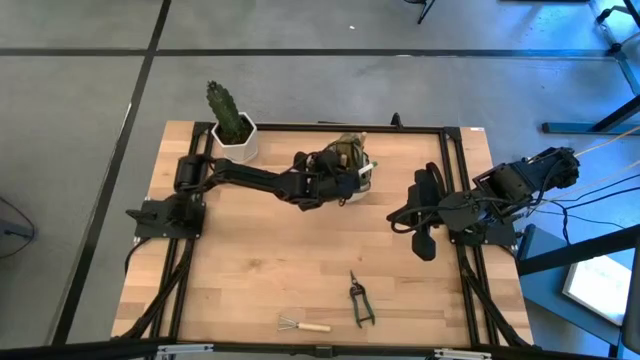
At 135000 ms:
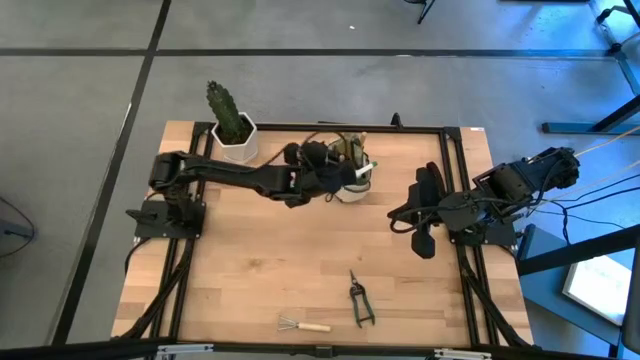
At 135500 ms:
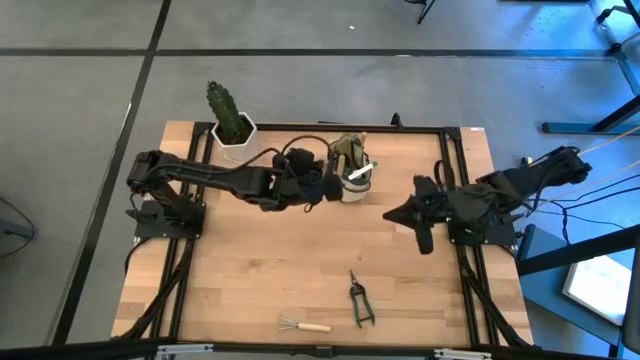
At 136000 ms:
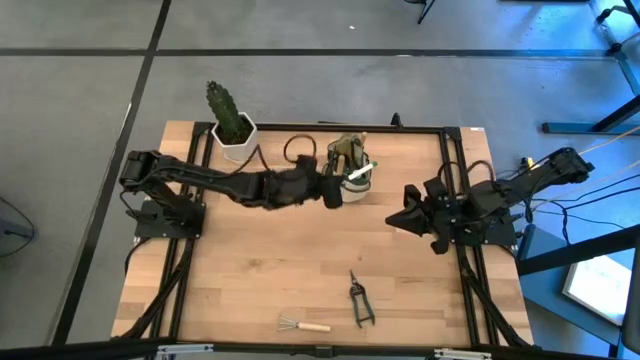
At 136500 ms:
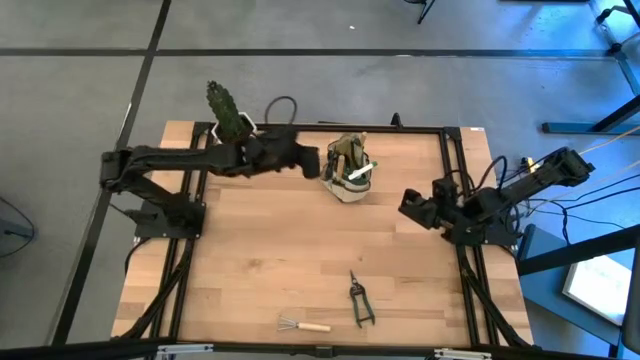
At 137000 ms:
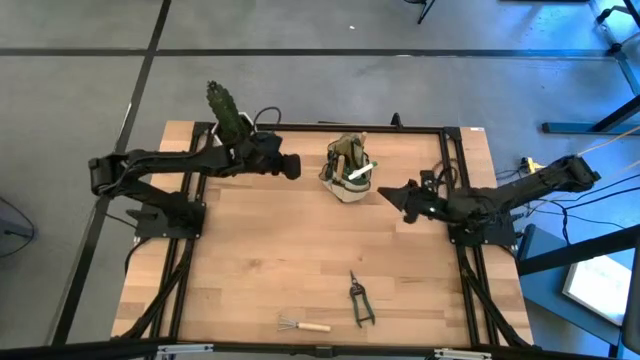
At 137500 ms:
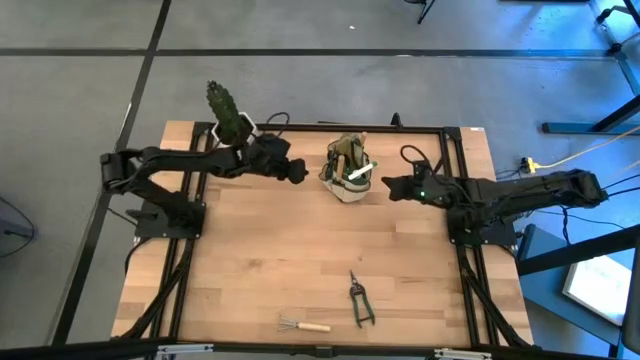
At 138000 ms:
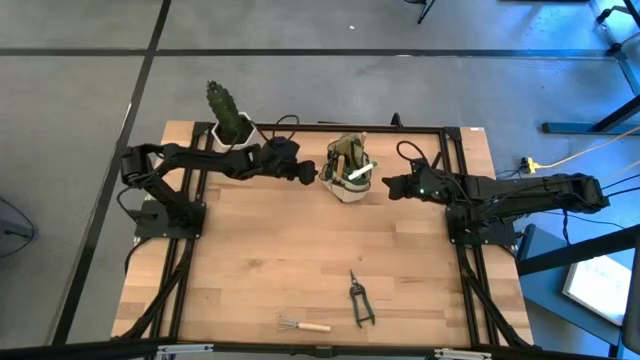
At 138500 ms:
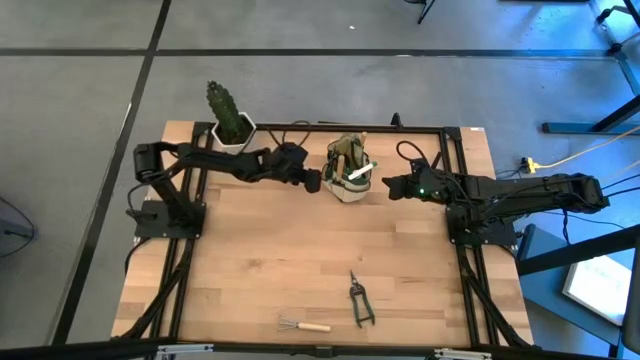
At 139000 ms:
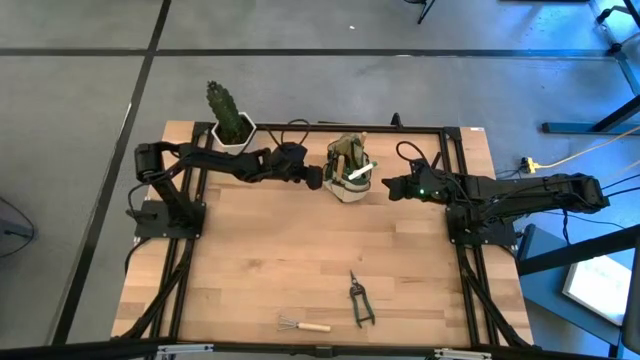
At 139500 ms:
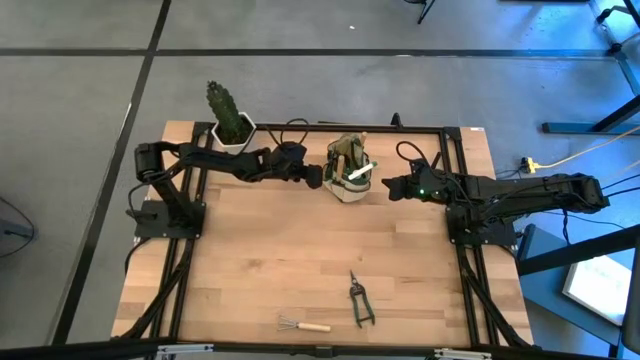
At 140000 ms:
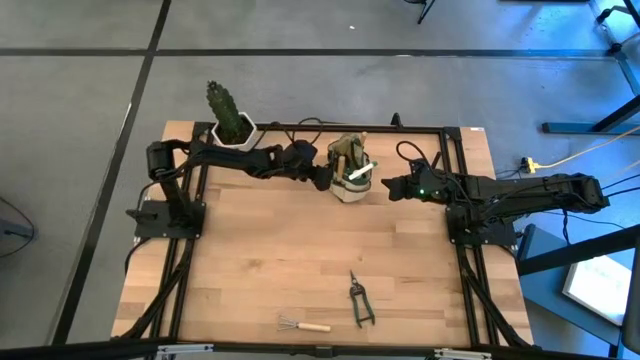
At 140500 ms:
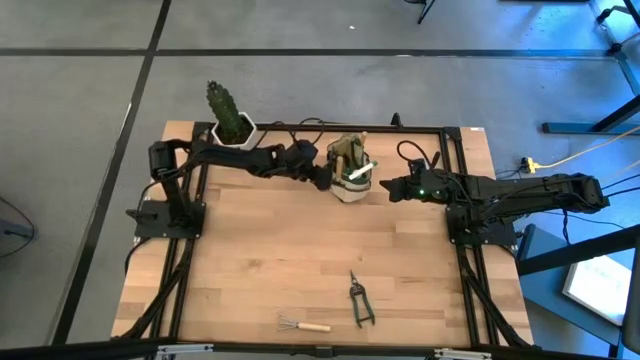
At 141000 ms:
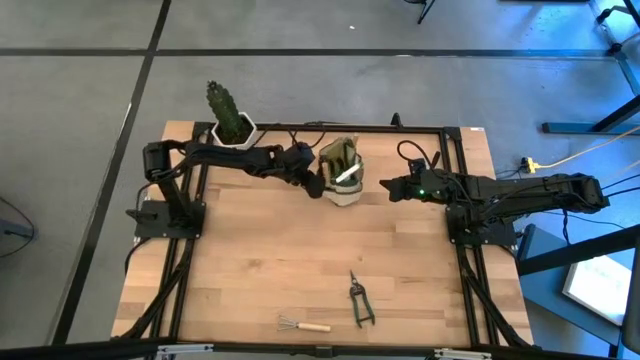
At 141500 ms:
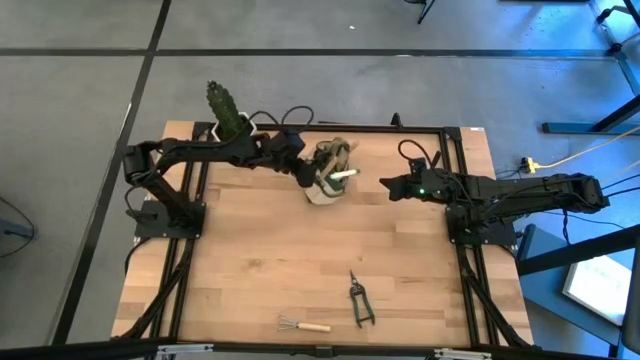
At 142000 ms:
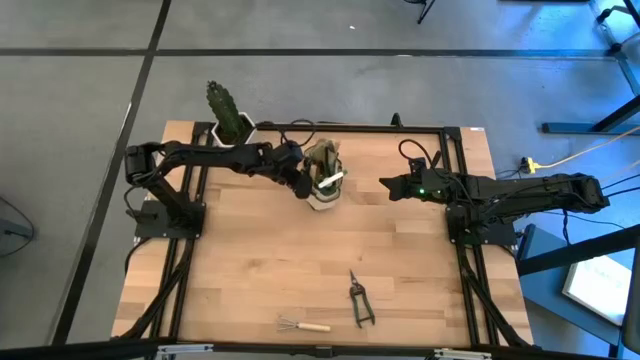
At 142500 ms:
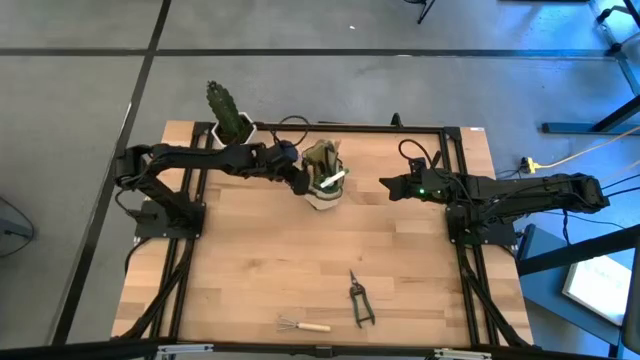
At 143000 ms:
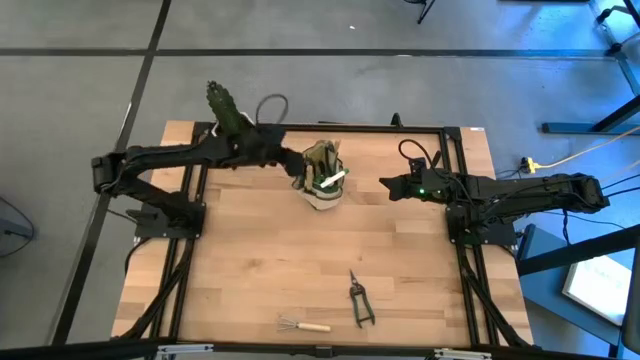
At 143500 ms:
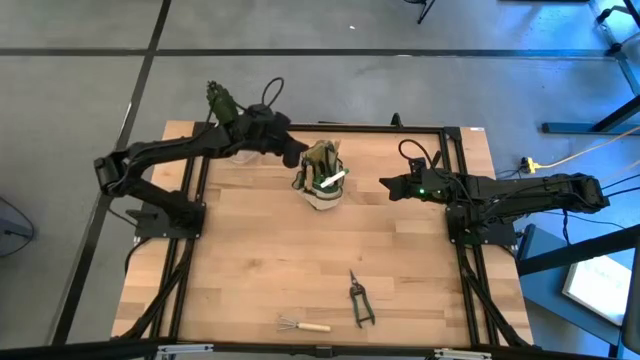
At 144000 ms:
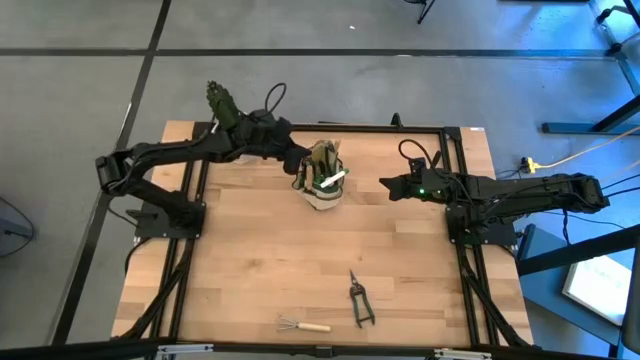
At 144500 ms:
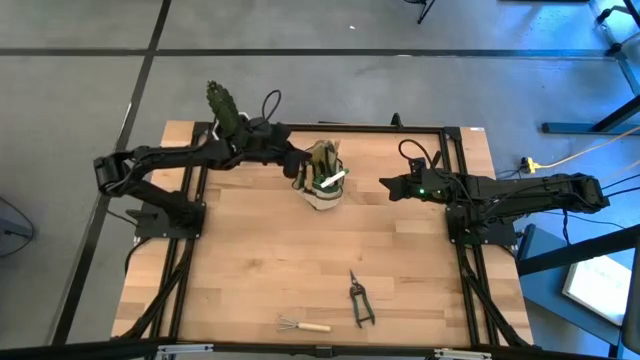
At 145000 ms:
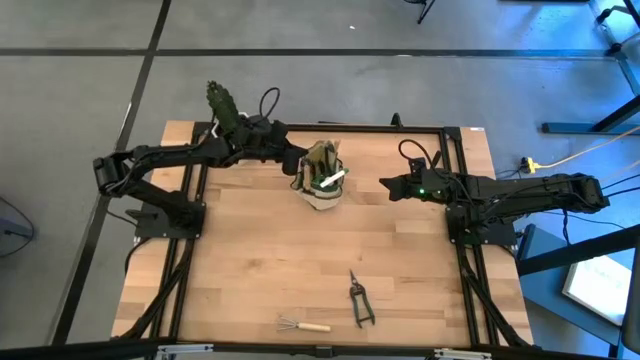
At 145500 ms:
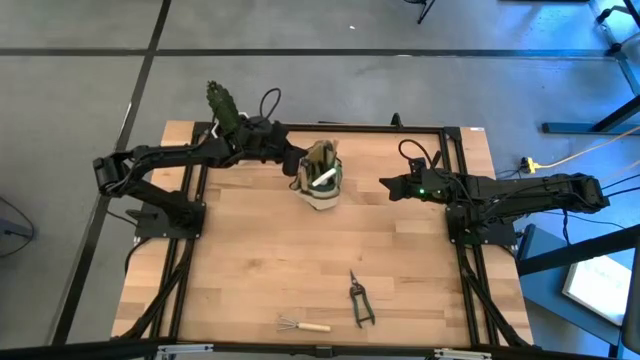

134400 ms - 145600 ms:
Task: Pick & Place Garden tools in Gardening bag
Adjust the gardening bag

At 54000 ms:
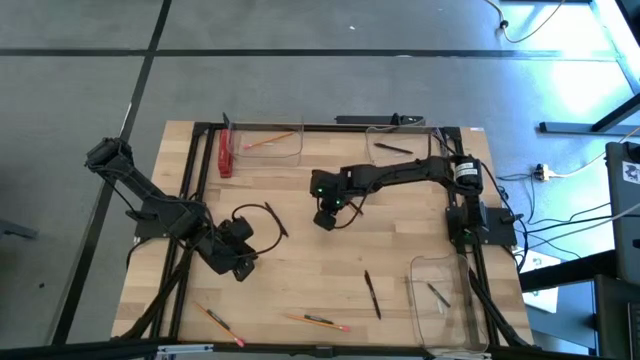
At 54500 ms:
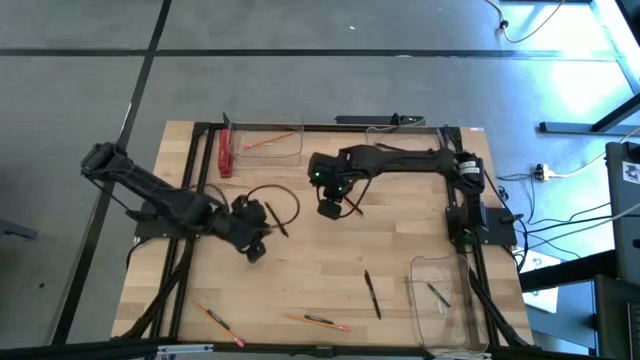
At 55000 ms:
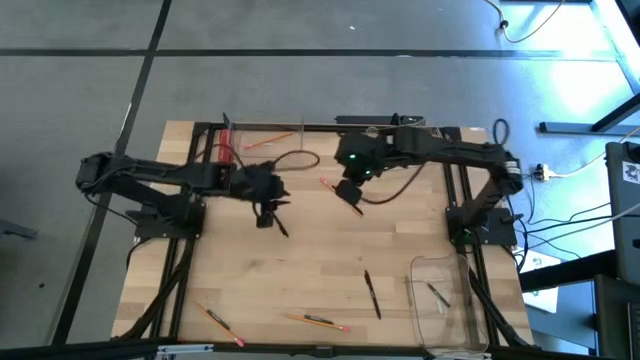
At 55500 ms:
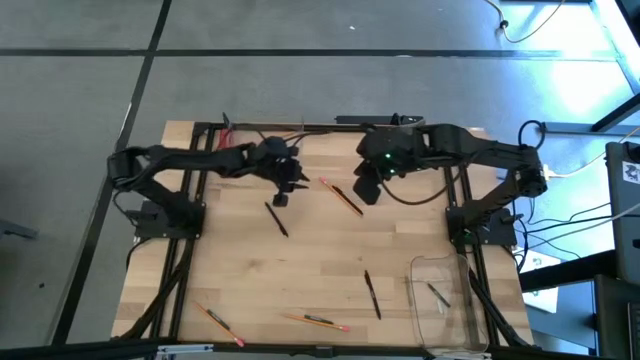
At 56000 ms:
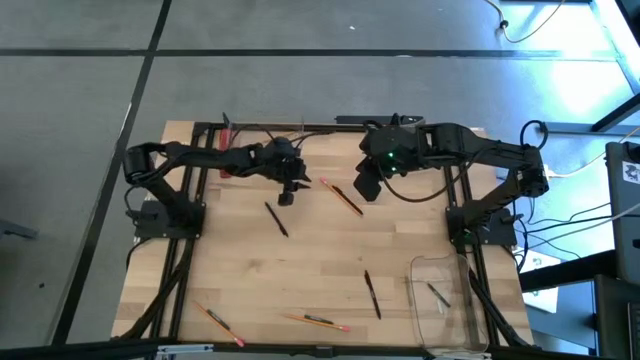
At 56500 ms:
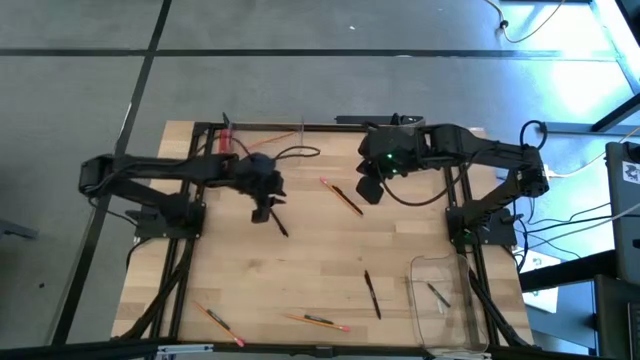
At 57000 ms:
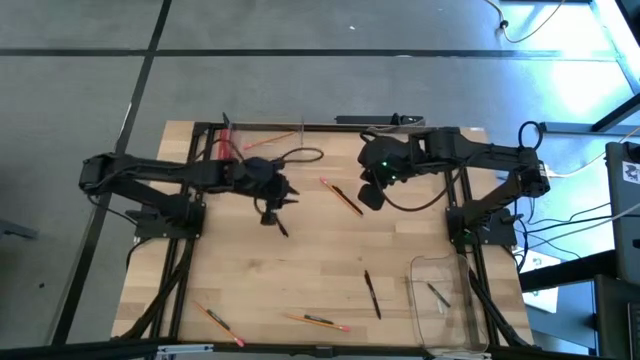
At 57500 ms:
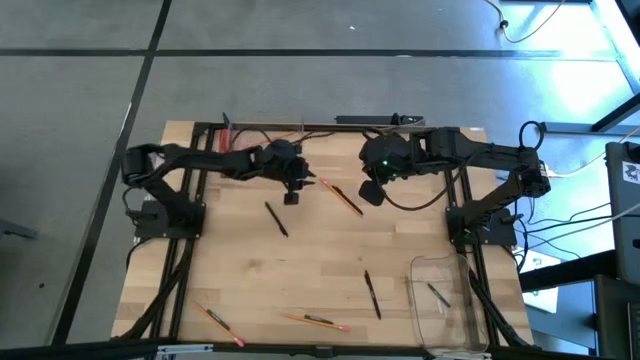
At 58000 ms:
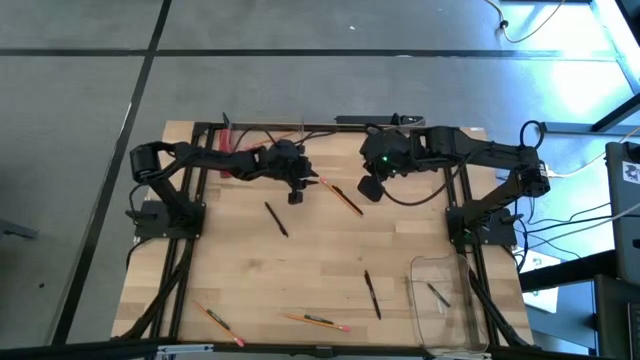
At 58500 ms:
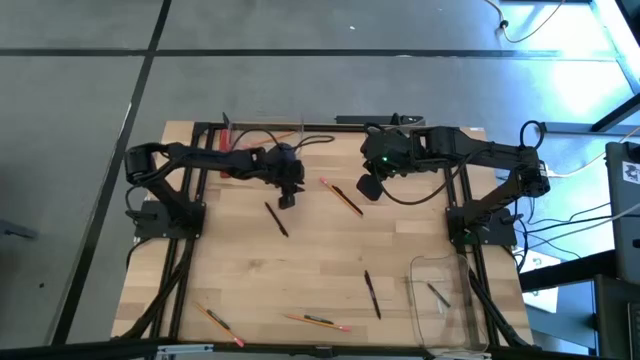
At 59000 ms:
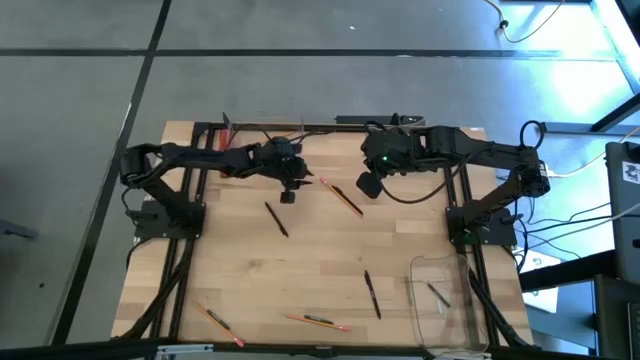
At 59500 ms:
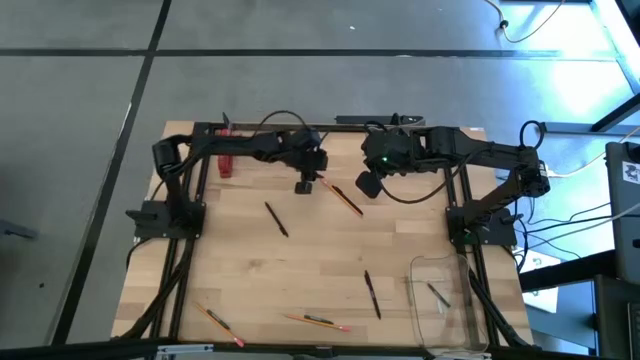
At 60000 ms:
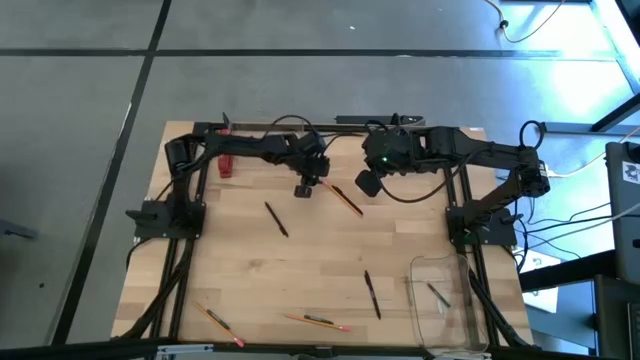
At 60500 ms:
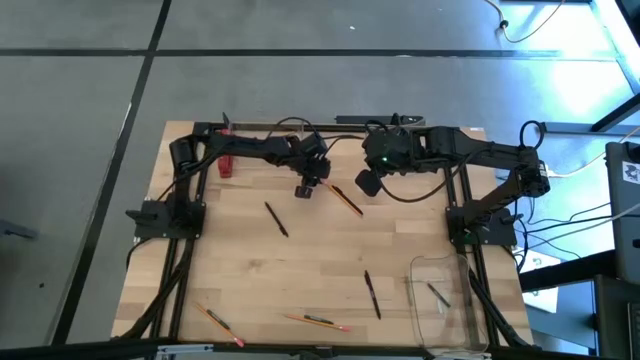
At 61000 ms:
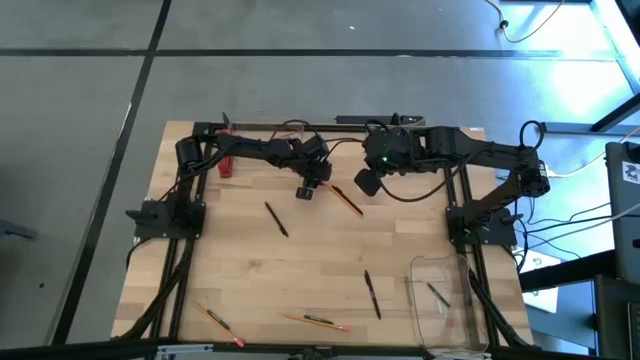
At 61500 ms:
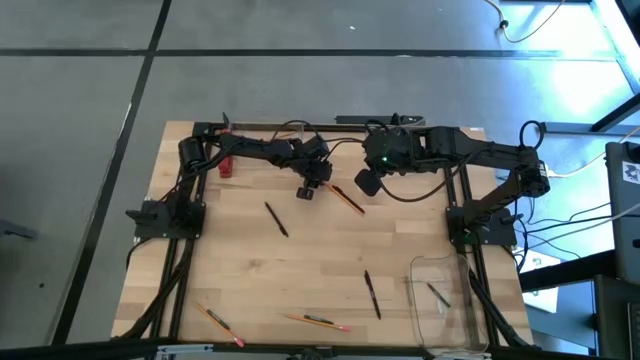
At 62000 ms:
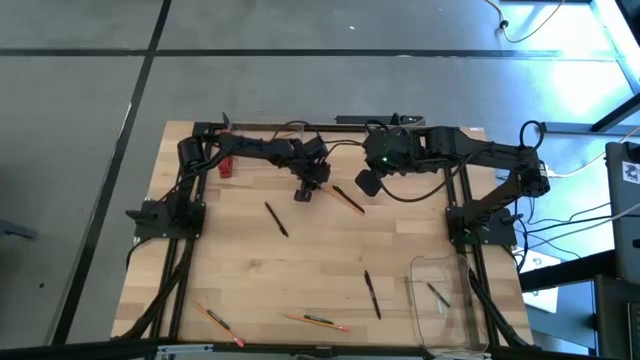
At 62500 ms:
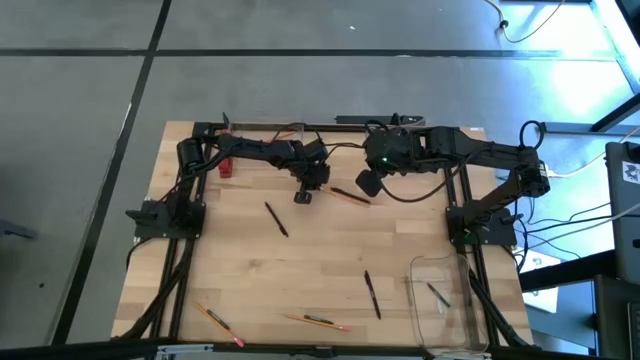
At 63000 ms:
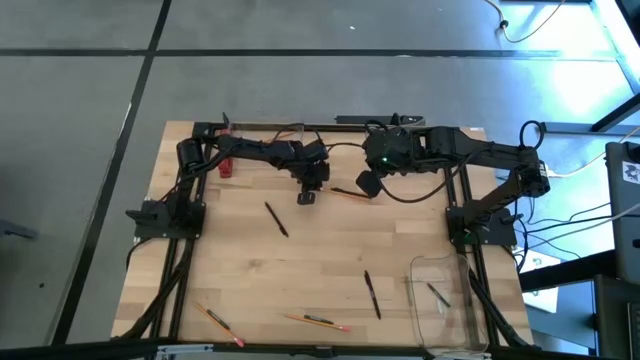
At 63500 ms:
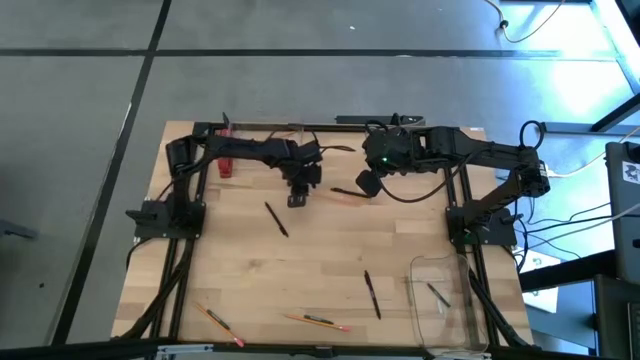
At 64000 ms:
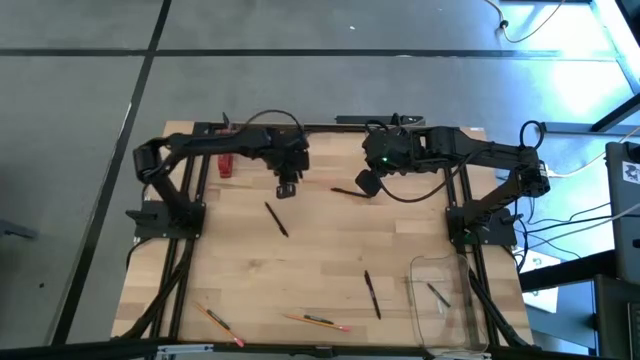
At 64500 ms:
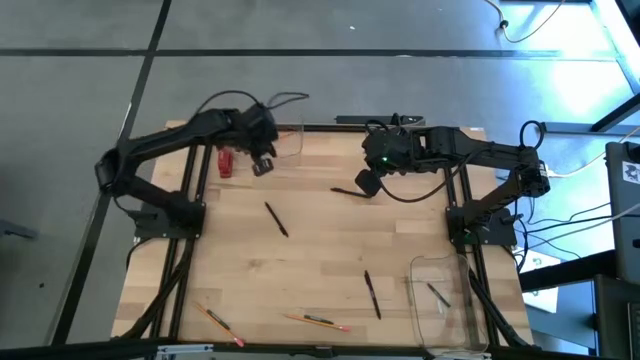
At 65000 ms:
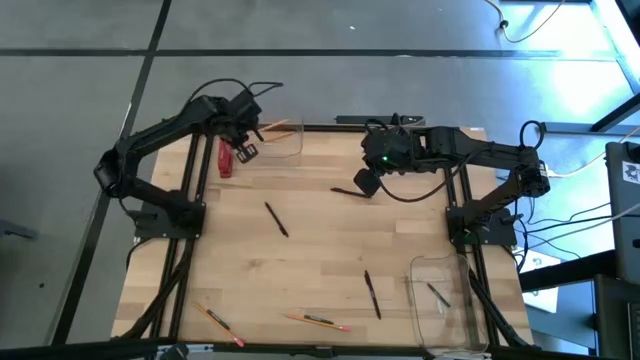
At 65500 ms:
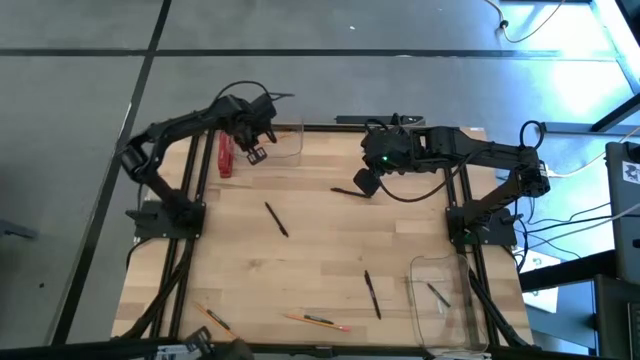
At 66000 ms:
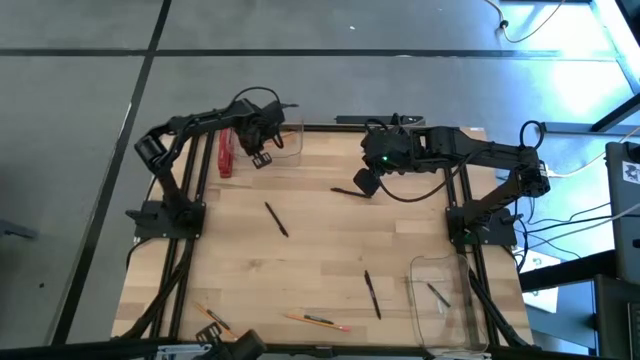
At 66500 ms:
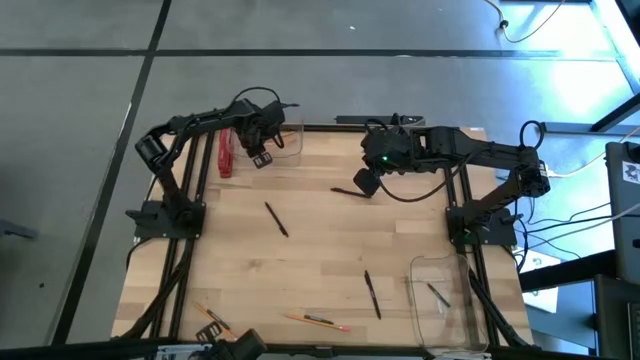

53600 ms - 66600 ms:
Task: Sort crayons/erasers/pens/pencils in bins
Put the top yellow pencil into the top left transparent bin
